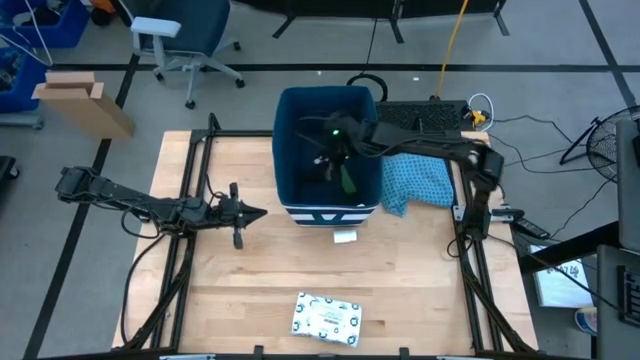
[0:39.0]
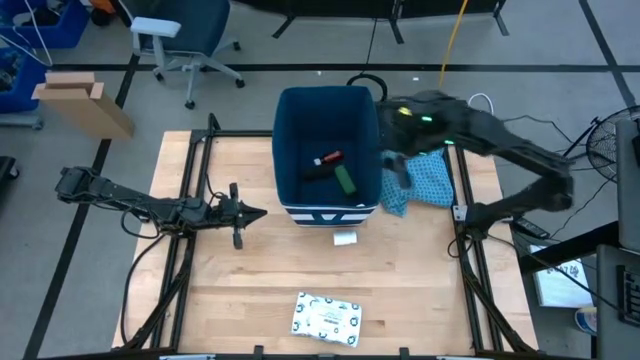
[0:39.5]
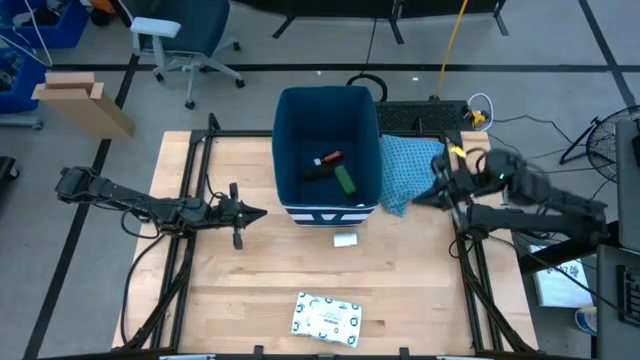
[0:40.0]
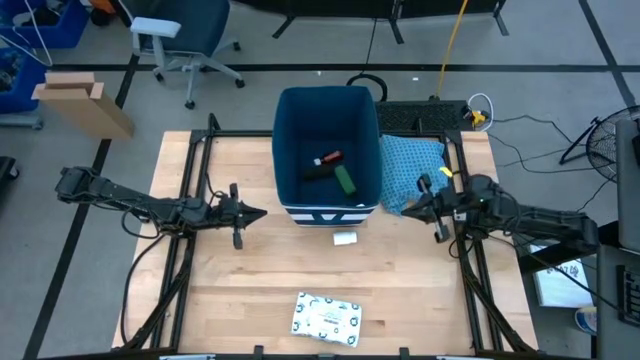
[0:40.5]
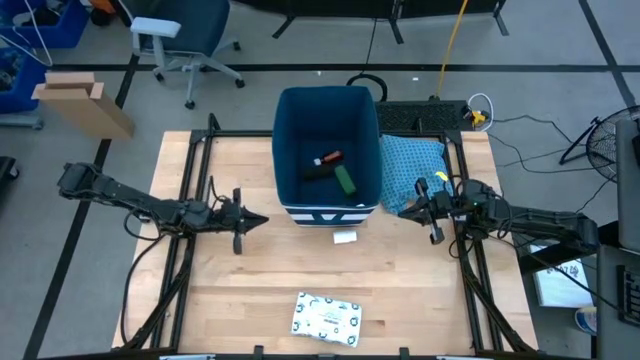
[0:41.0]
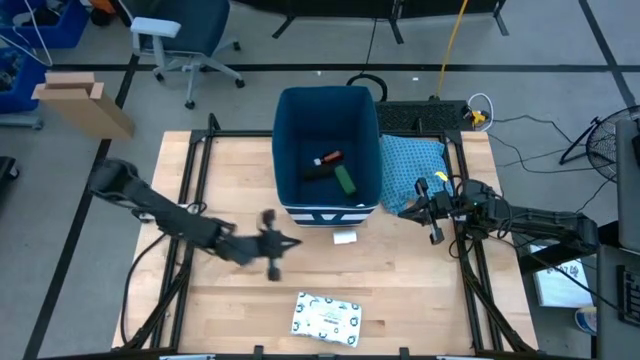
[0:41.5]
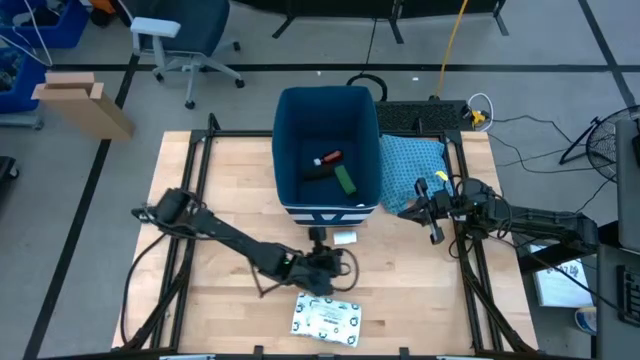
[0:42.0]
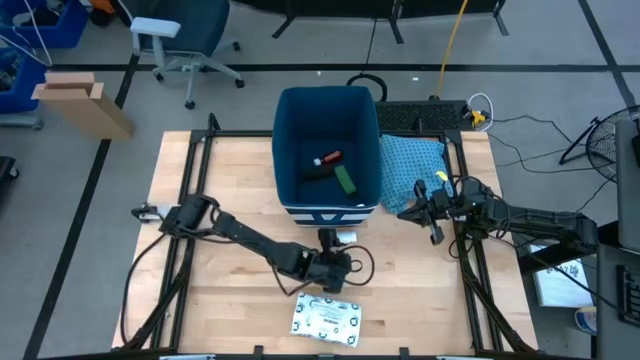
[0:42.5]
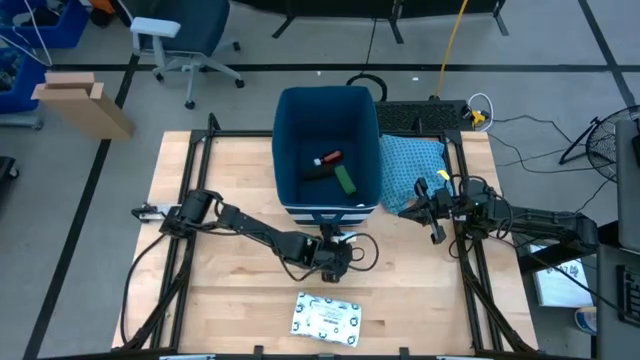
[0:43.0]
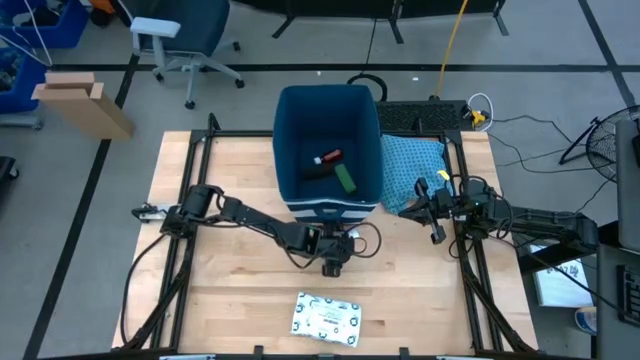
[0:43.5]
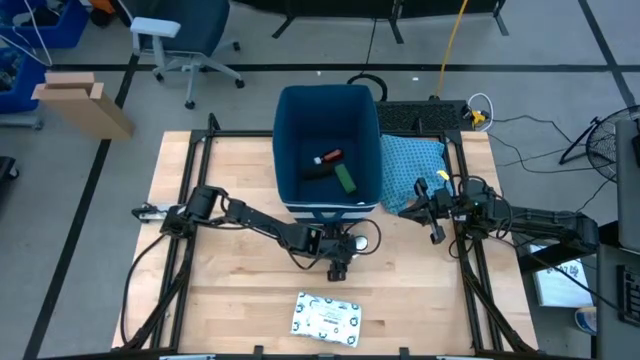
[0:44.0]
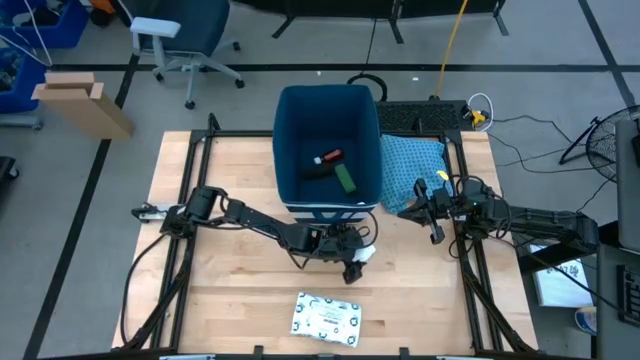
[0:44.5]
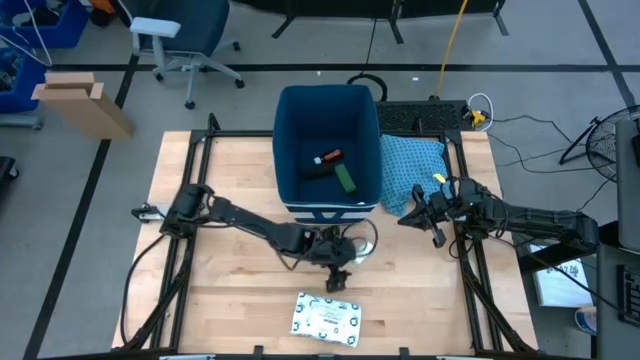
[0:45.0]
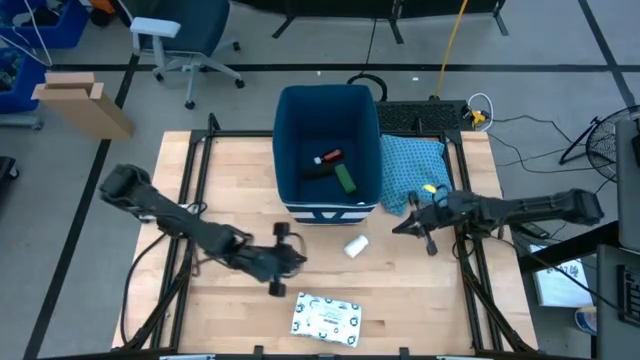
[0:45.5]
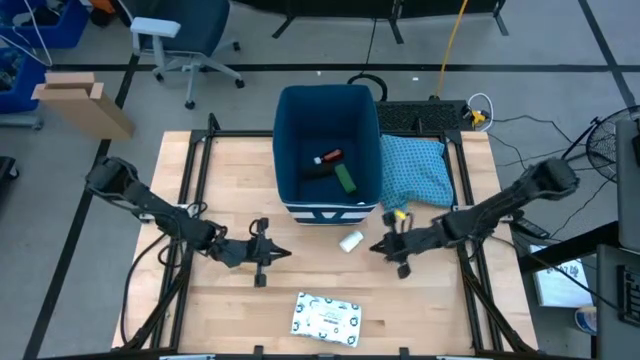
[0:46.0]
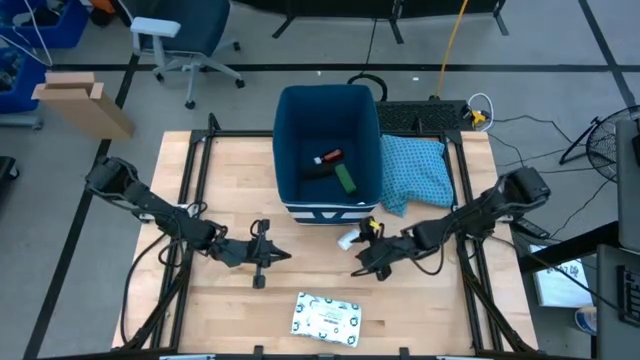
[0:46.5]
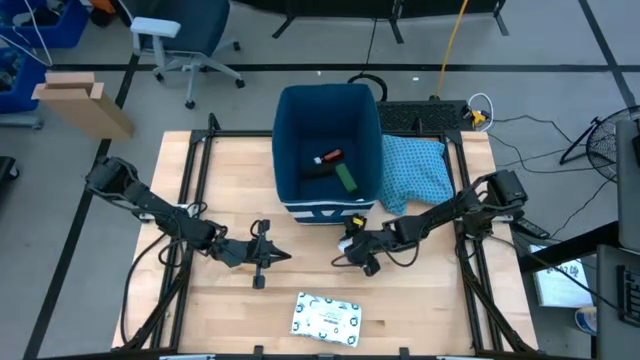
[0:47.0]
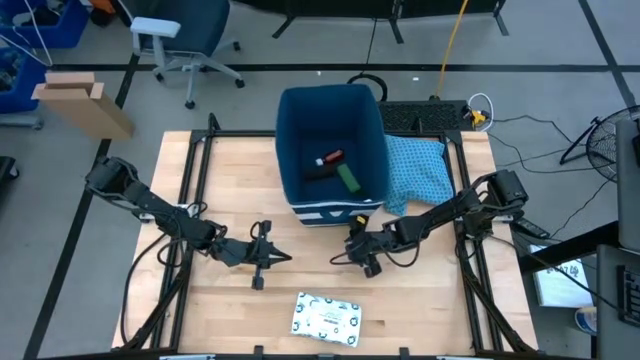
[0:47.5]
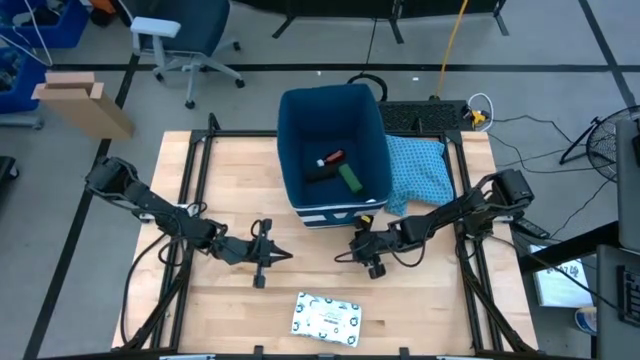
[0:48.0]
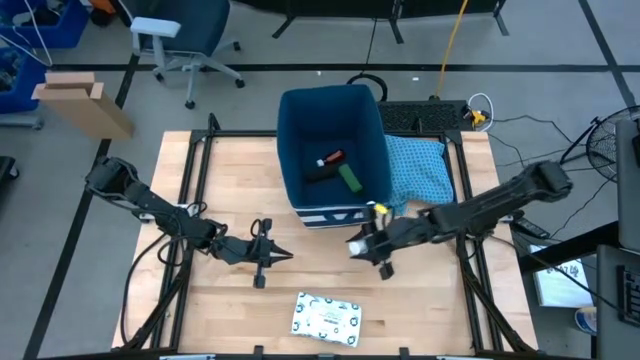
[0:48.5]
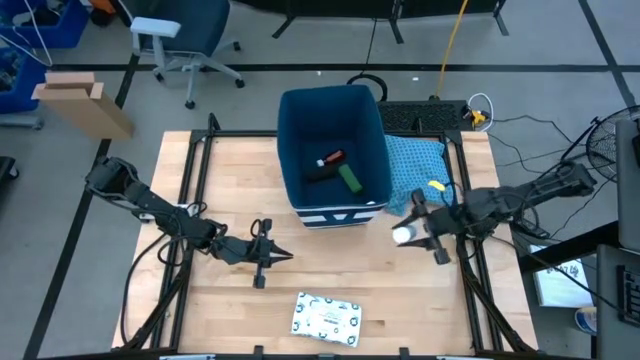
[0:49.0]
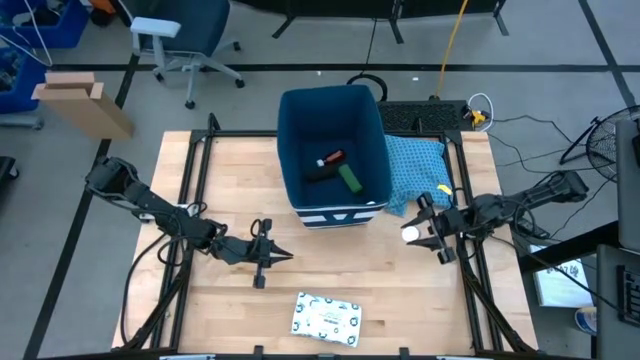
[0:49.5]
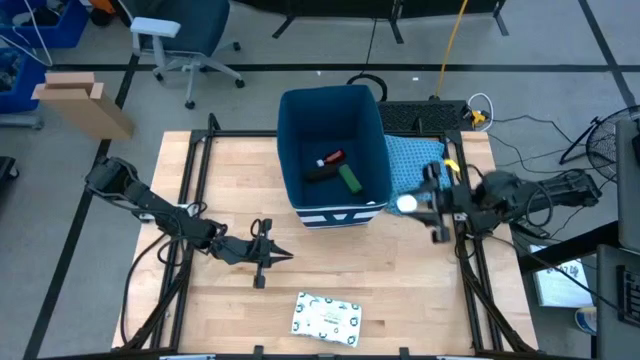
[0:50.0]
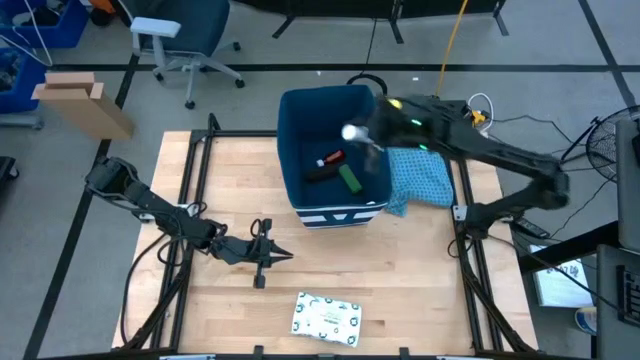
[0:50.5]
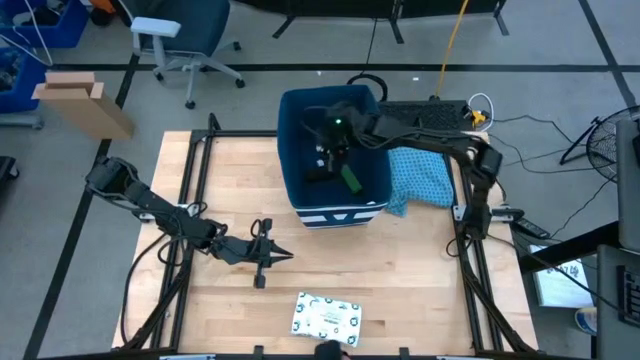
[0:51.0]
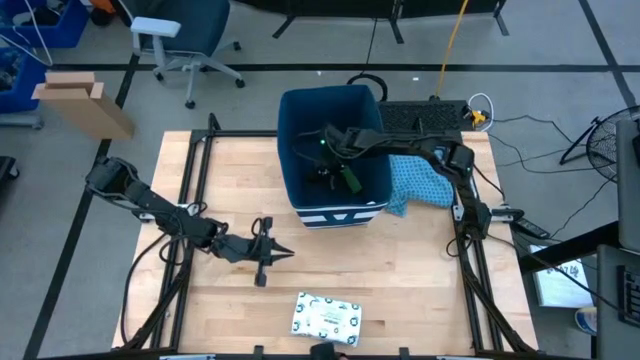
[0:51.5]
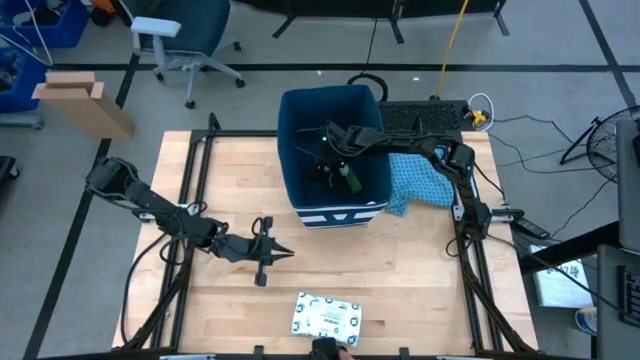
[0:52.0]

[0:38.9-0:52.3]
Task: Pick & place medical supplies in basket/bin
Put the white pill bottle into the blue bin

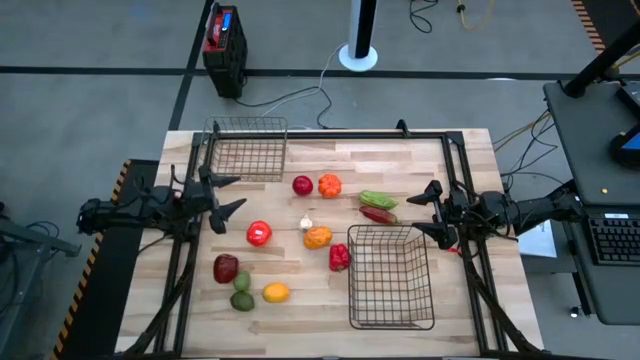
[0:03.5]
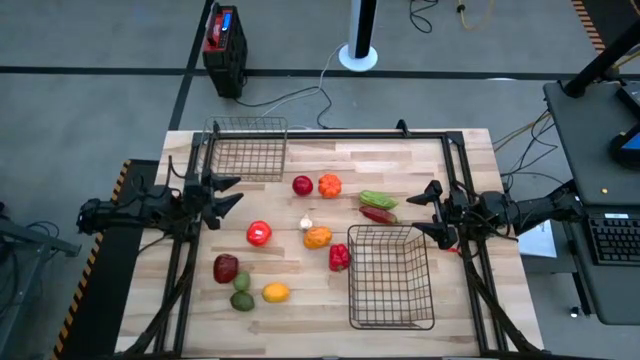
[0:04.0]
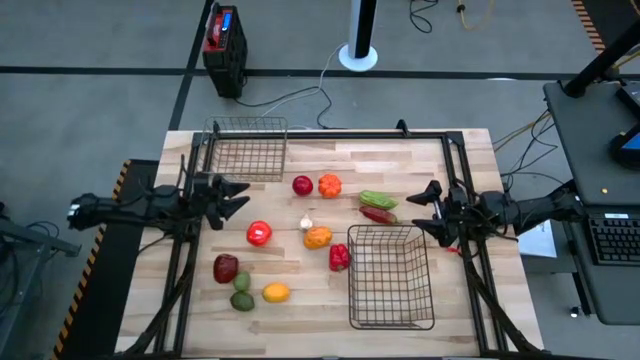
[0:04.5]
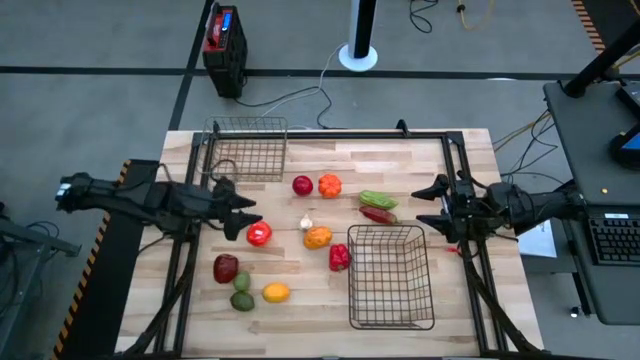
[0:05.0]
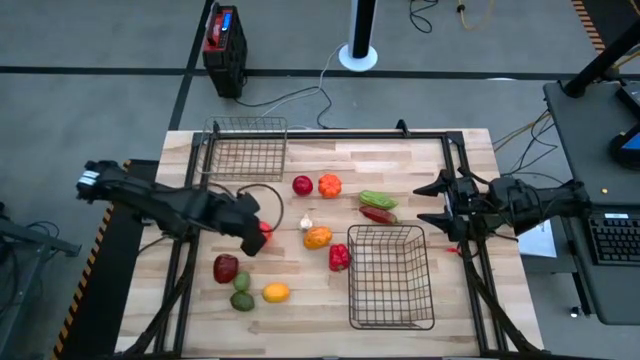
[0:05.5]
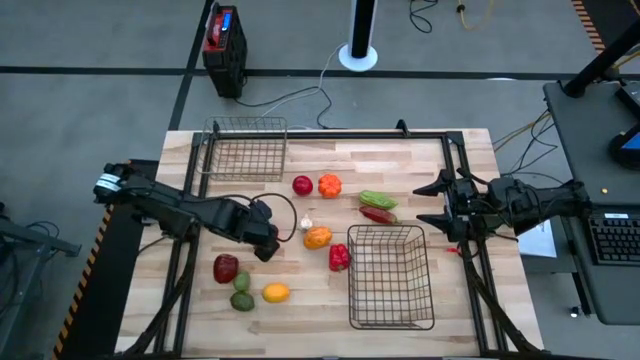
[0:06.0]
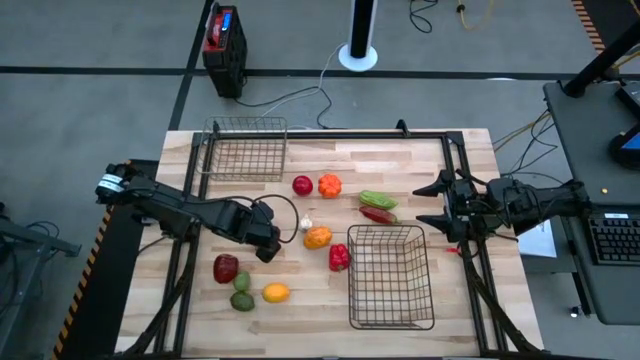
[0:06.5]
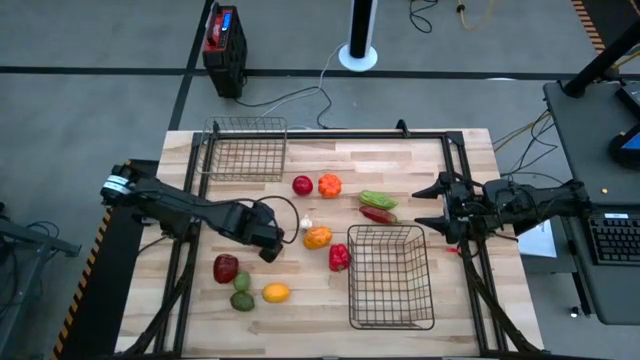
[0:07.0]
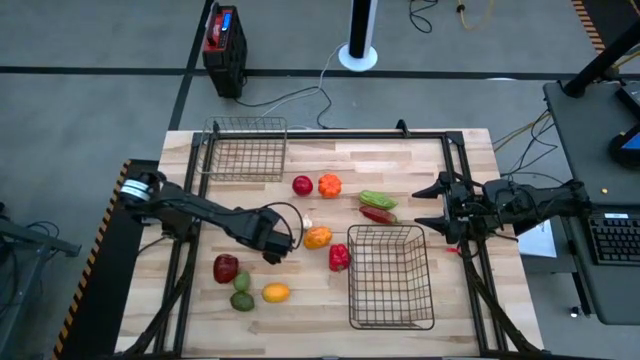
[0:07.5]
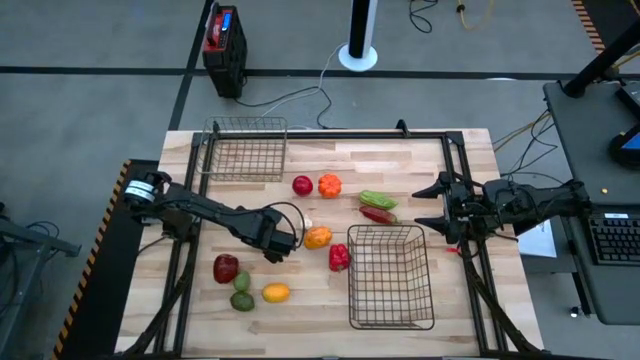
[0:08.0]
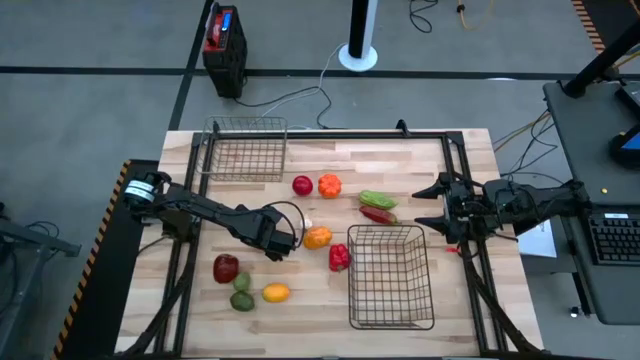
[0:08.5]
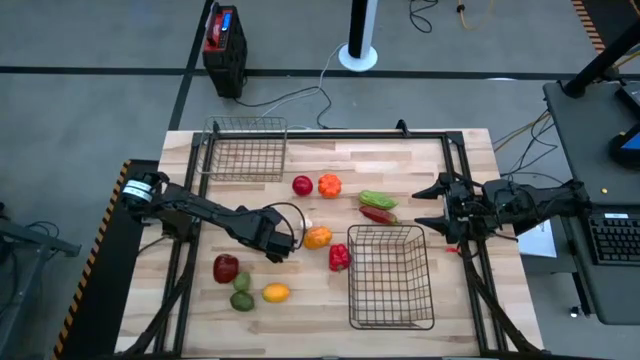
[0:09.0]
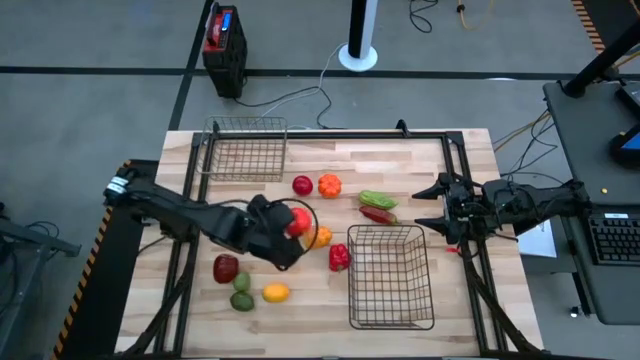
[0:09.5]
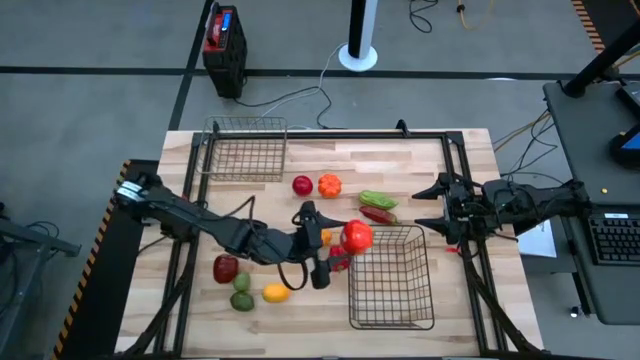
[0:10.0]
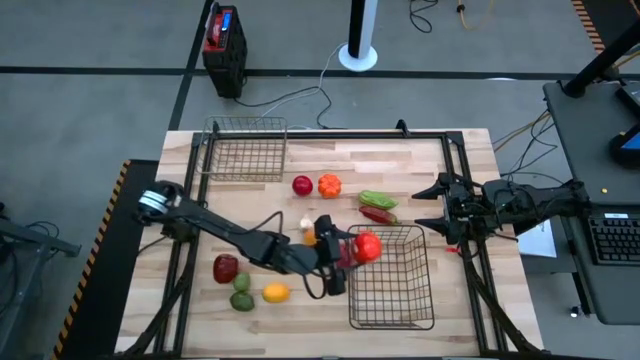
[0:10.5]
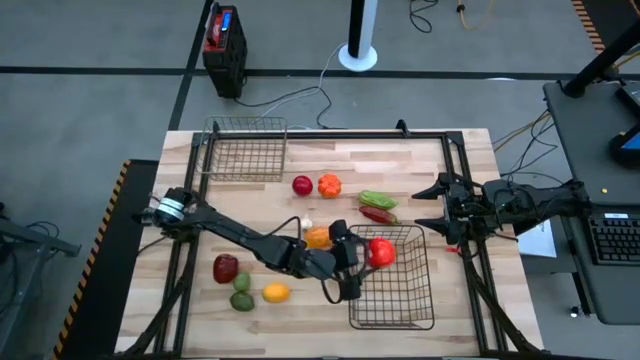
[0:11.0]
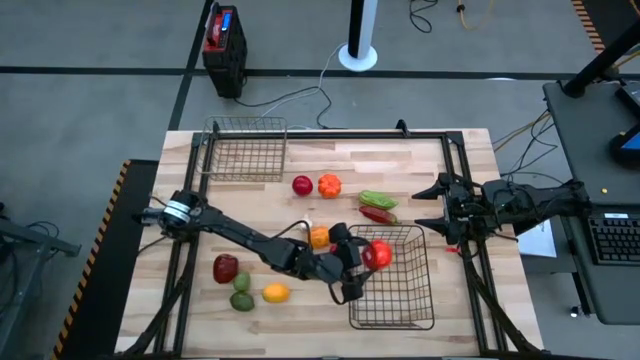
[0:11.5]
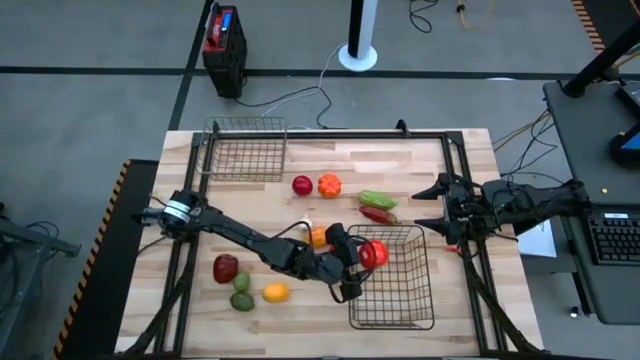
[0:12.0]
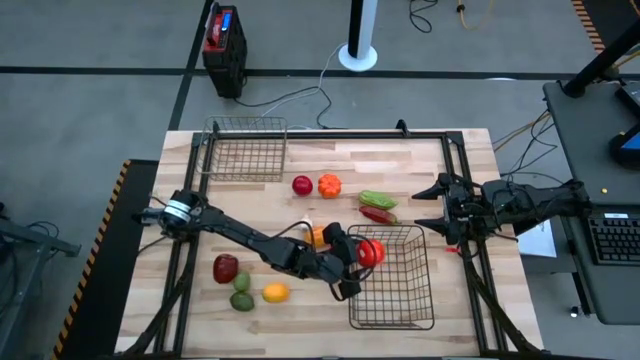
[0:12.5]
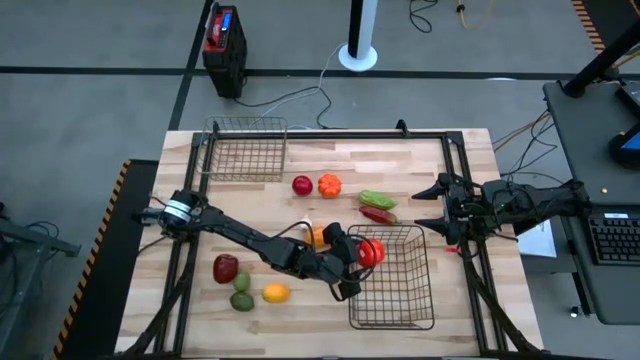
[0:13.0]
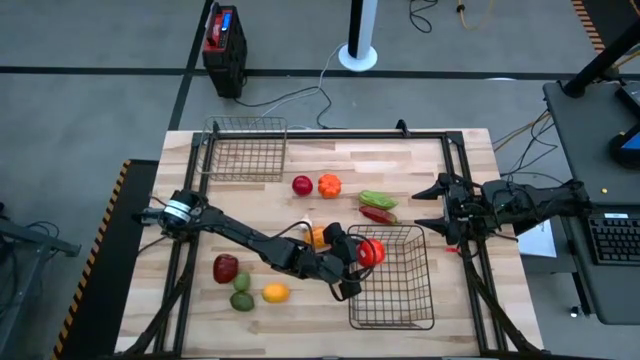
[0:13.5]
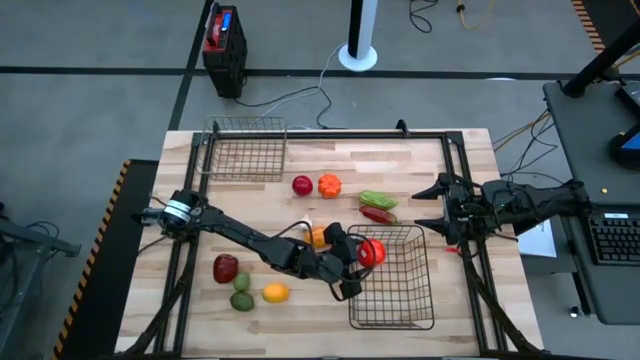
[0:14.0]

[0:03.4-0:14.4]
Task: Sort produce into baskets
Put the bottom red tomato into the black wire basket
